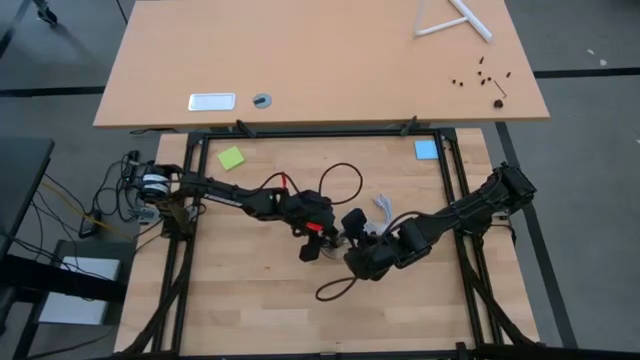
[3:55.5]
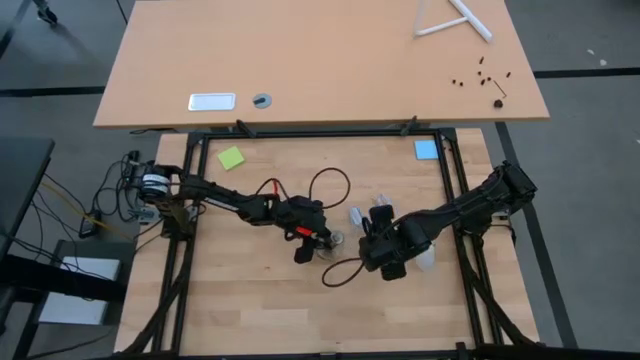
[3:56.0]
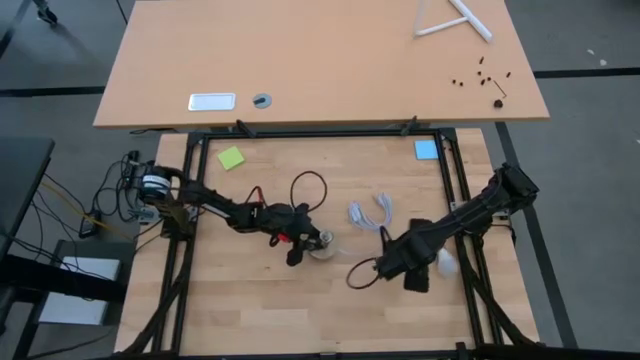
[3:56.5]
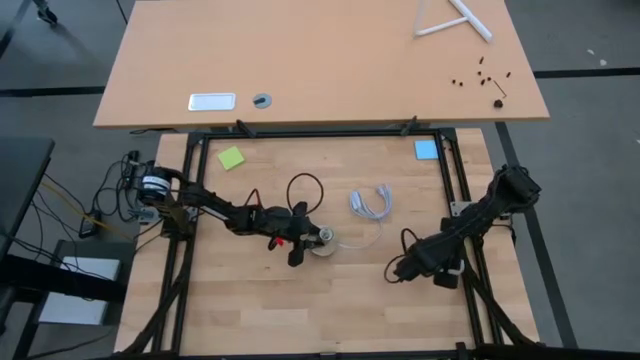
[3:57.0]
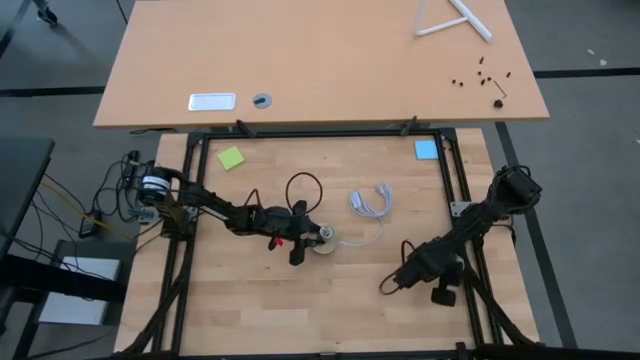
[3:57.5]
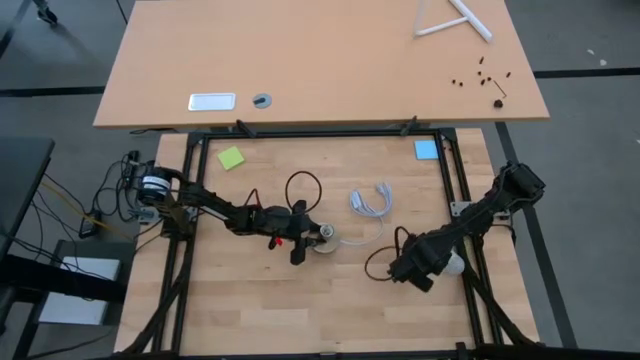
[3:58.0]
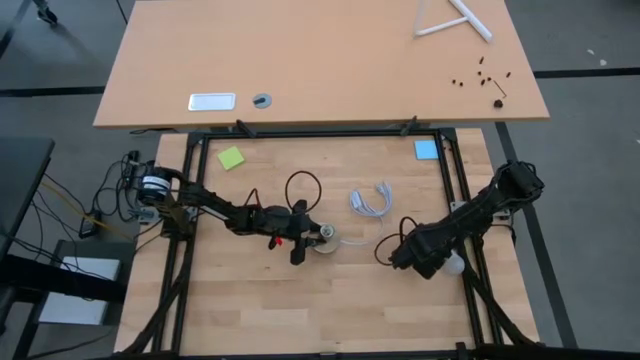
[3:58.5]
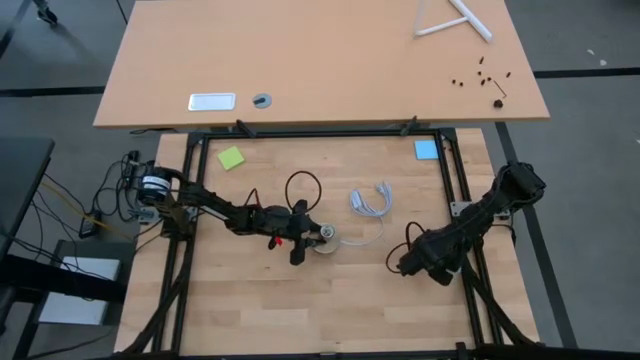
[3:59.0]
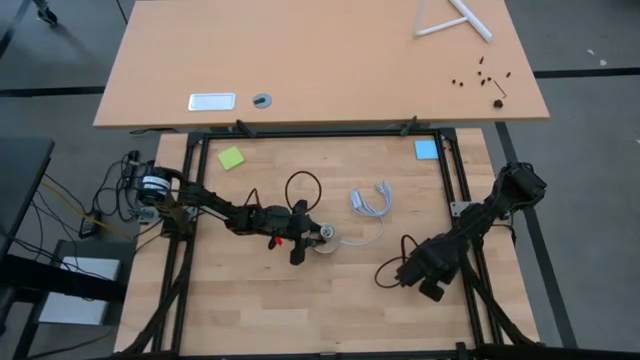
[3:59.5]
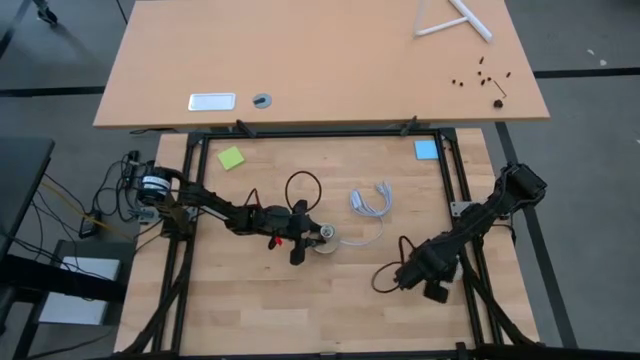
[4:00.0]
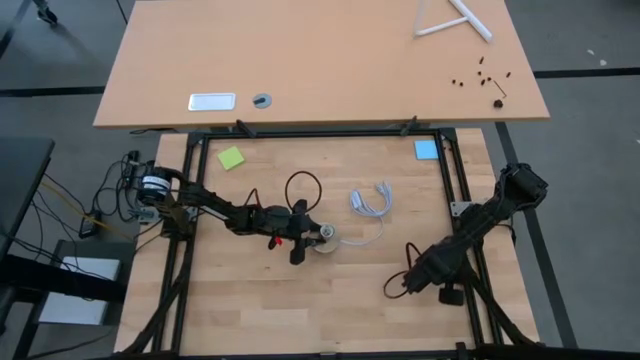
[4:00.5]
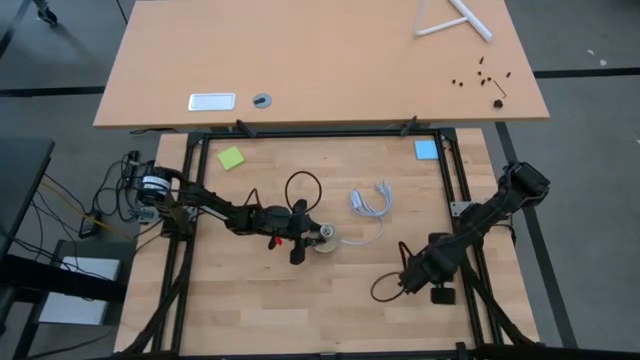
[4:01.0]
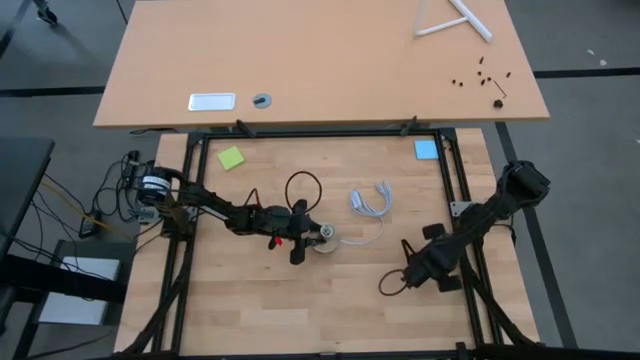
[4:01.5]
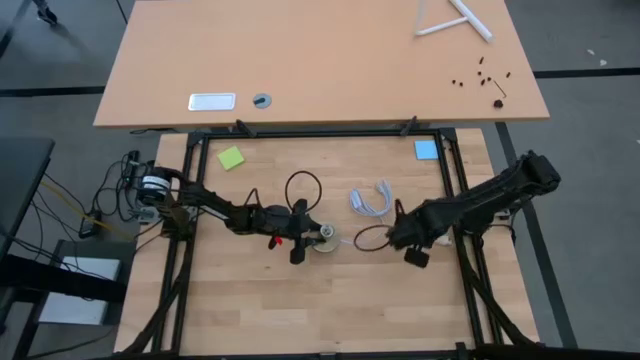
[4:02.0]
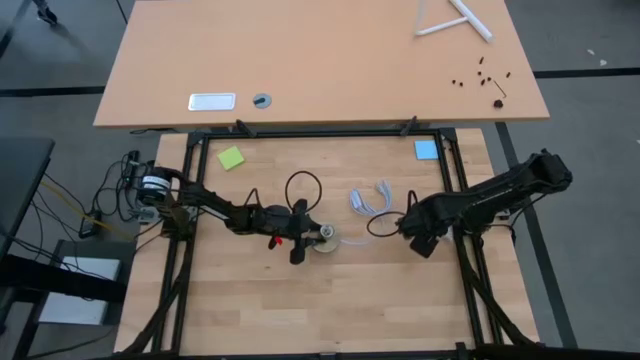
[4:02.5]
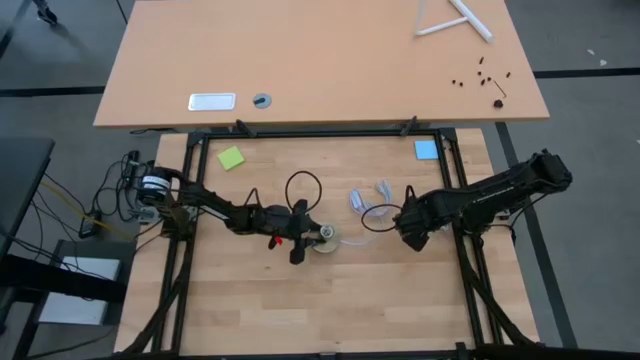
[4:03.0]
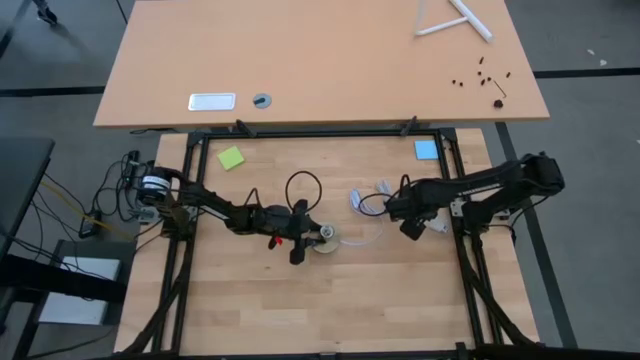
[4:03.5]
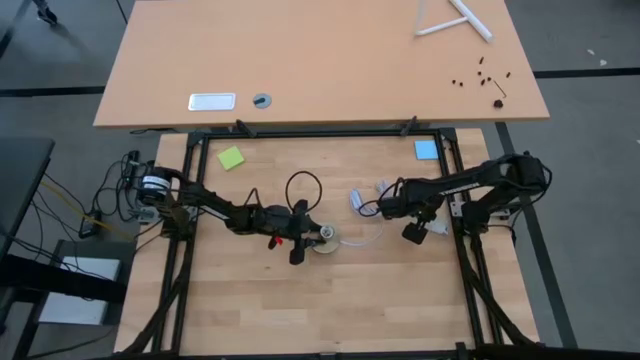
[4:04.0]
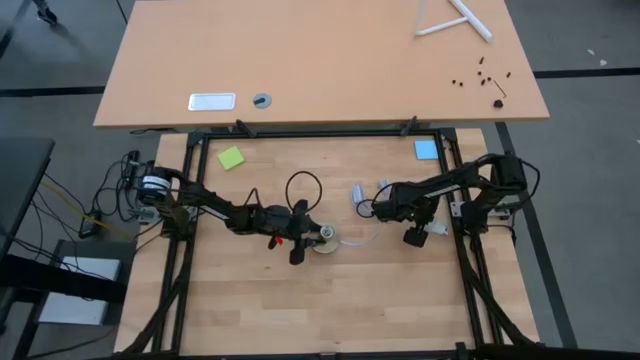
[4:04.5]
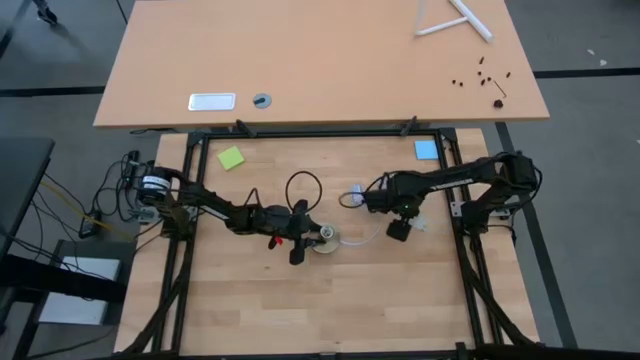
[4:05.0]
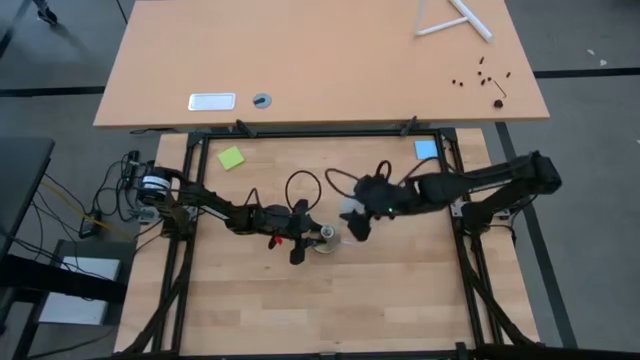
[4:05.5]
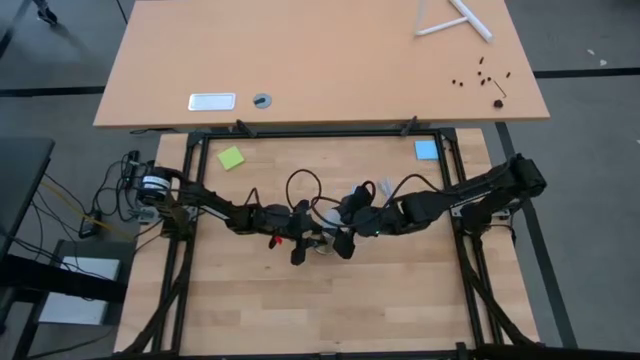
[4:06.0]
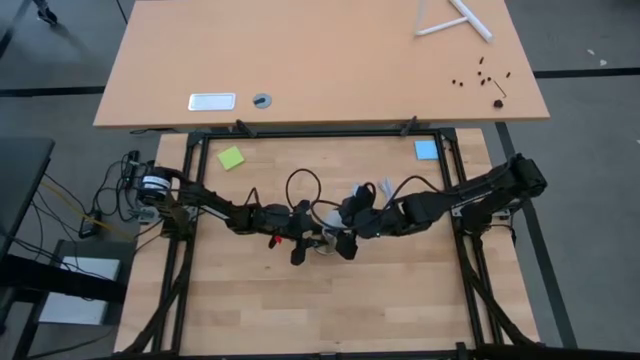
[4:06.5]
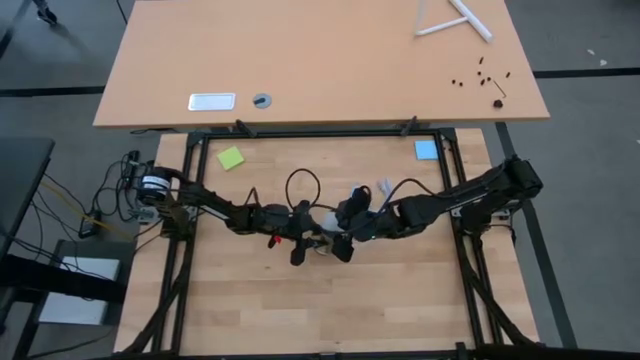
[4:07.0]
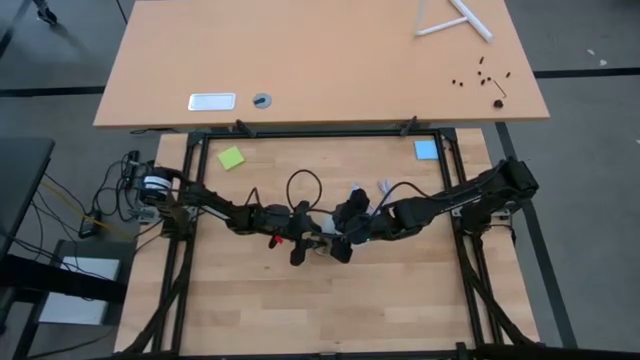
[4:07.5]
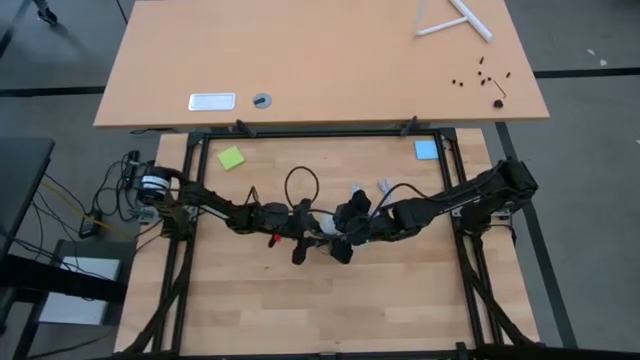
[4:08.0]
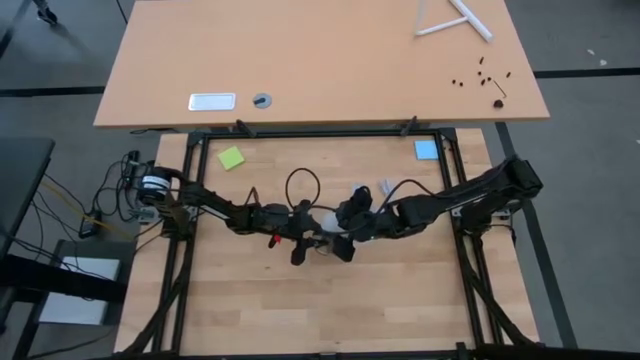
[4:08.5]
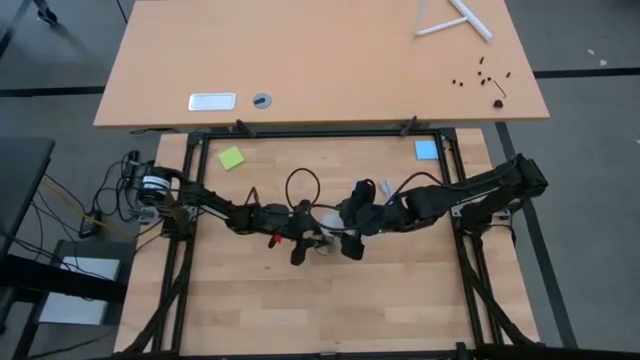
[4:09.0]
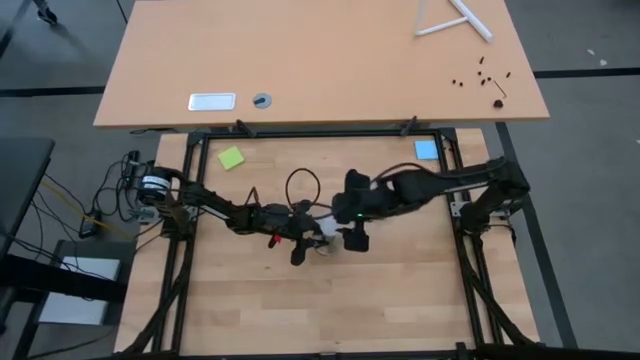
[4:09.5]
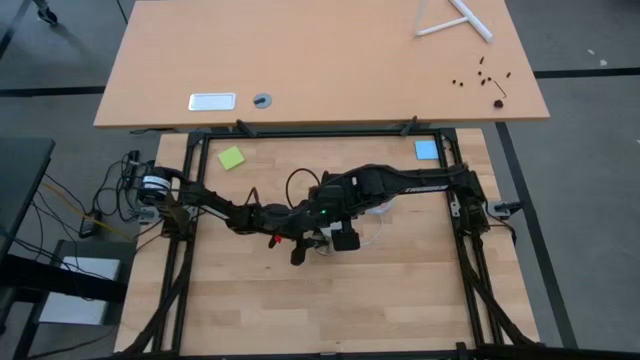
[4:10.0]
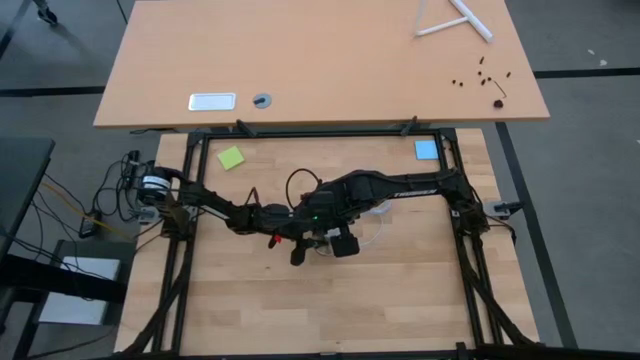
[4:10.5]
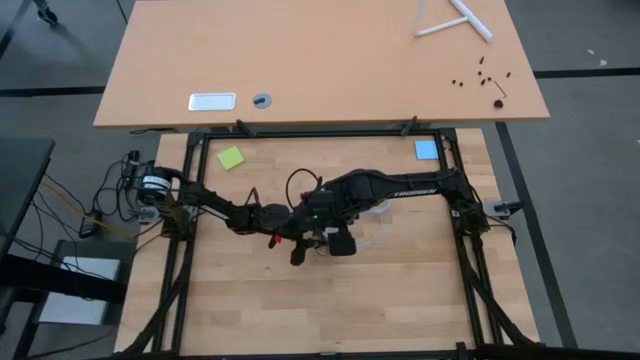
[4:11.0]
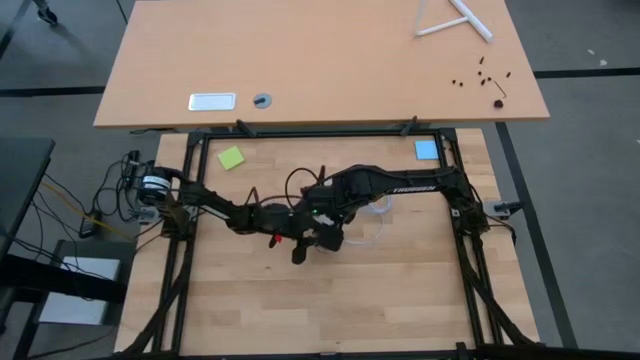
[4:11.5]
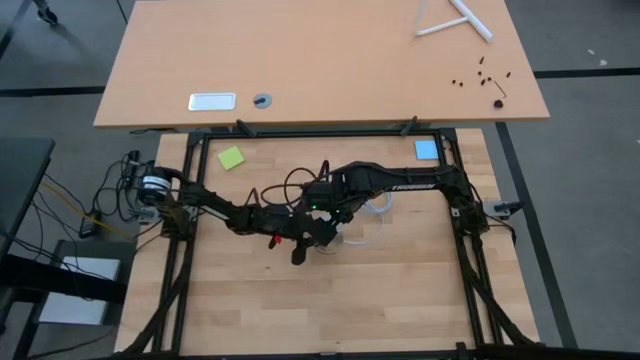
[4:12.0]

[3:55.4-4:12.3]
Task: Screw lightbulb
Insert the lightbulb into the lamp

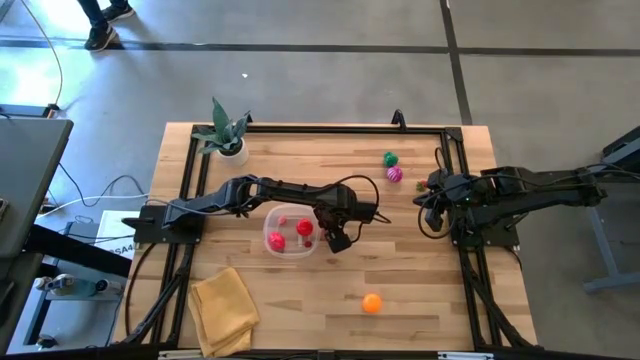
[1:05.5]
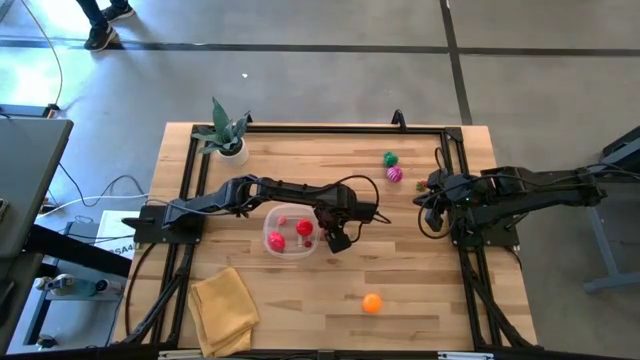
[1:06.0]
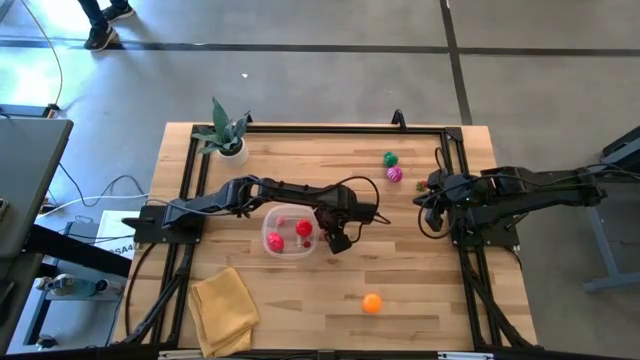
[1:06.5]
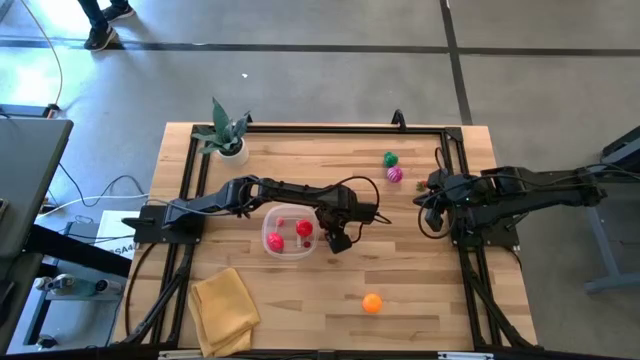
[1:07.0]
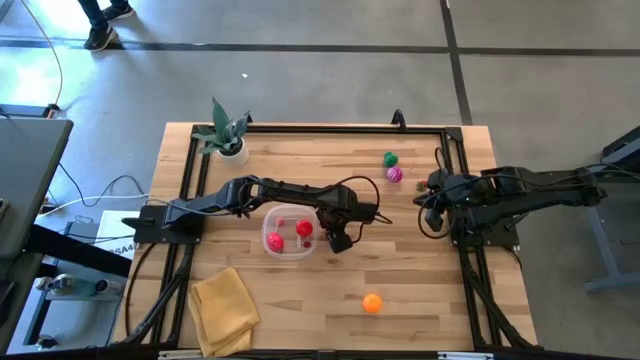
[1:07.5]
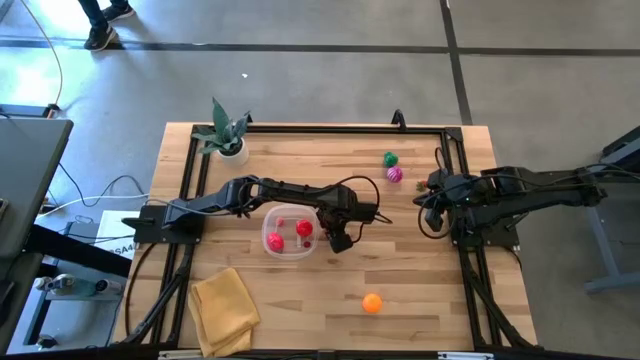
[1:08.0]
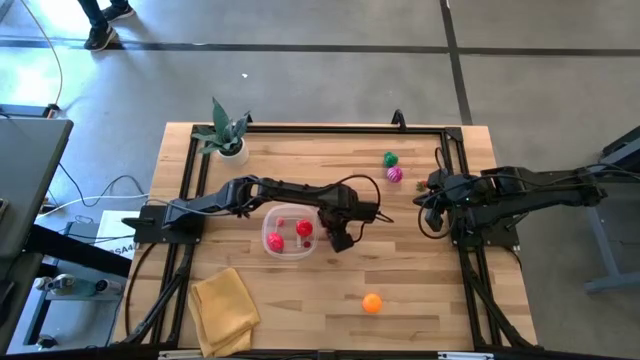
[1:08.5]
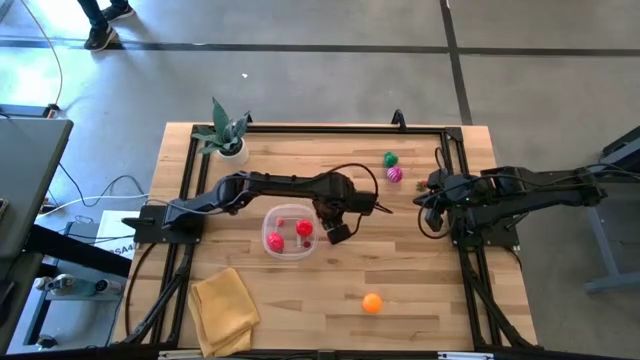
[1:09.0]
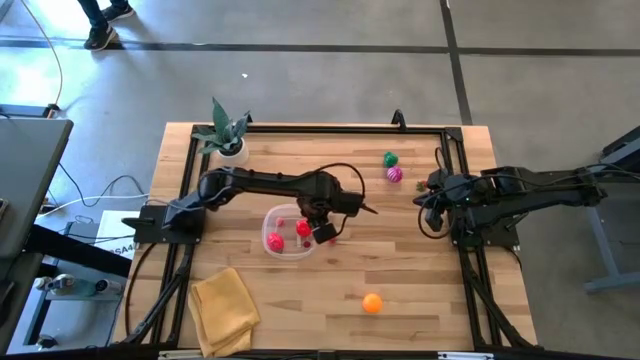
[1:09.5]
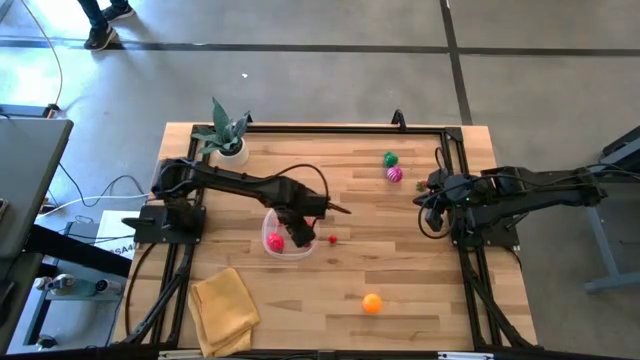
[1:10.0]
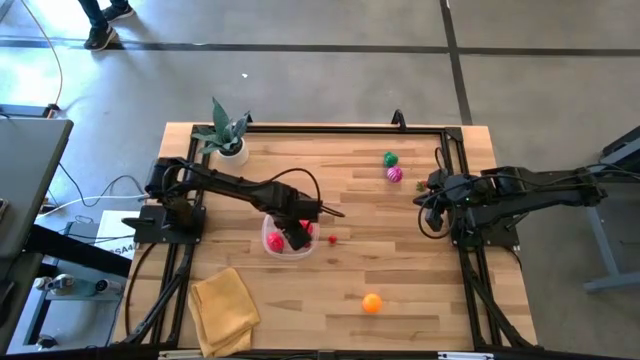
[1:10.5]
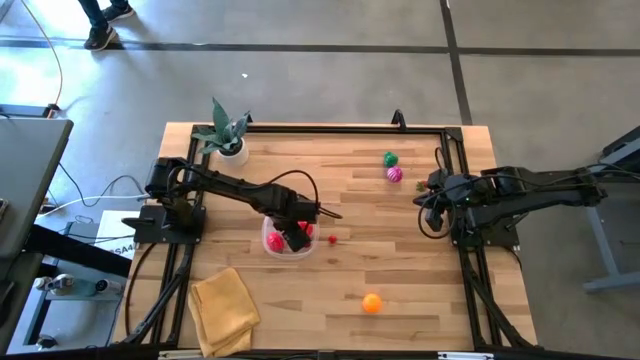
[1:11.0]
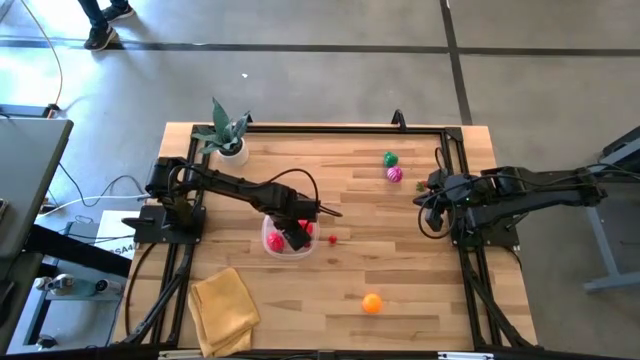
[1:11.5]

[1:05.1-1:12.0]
Task: Pick and placing Produce into tupperware
Put the pink peach into the transparent container
